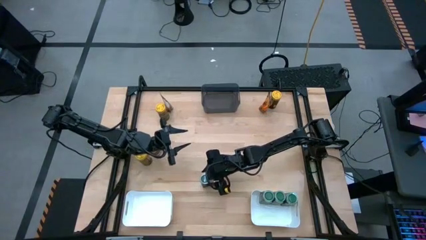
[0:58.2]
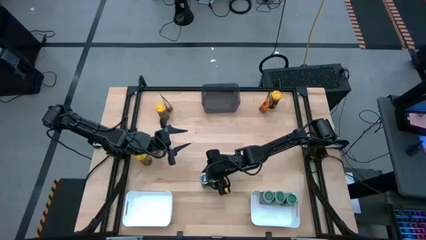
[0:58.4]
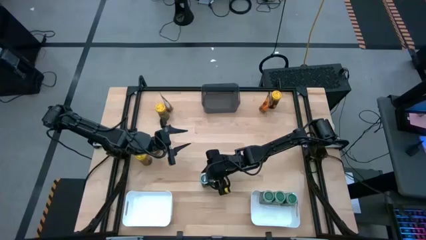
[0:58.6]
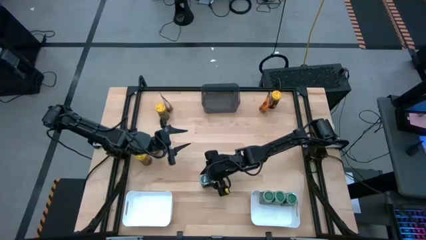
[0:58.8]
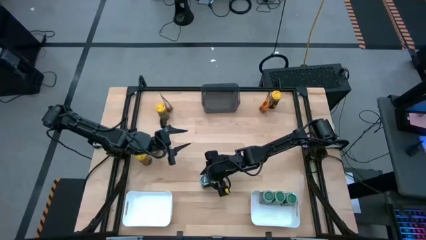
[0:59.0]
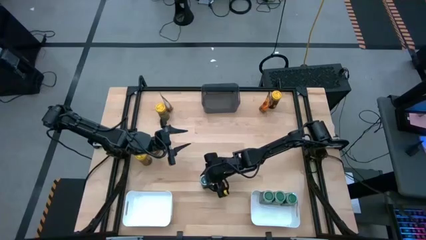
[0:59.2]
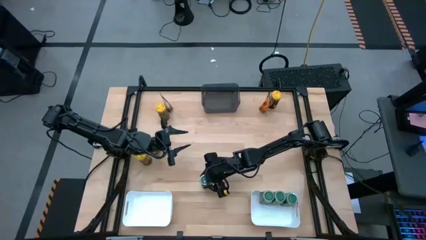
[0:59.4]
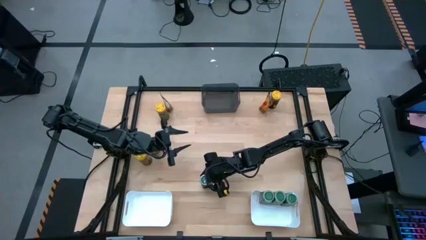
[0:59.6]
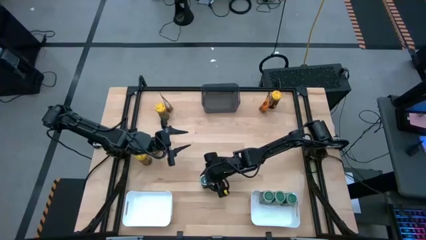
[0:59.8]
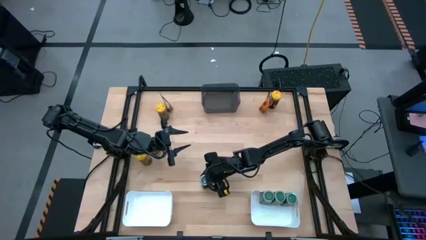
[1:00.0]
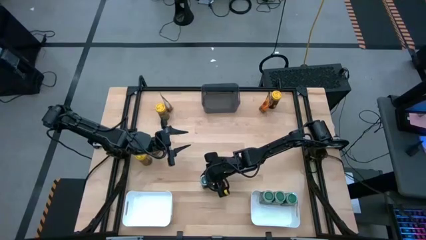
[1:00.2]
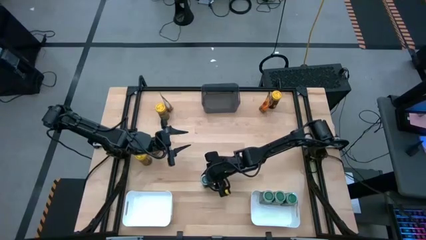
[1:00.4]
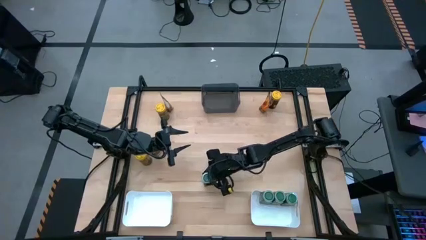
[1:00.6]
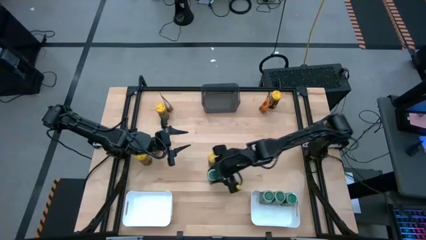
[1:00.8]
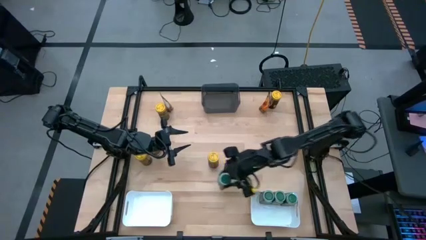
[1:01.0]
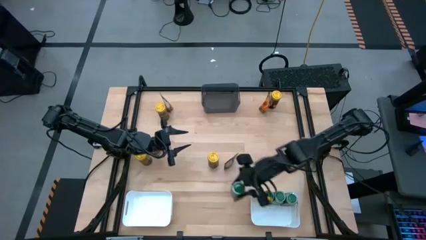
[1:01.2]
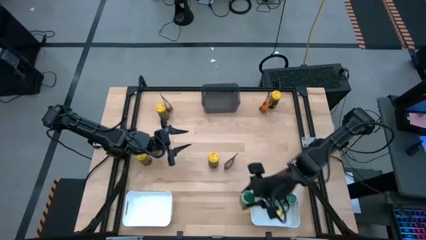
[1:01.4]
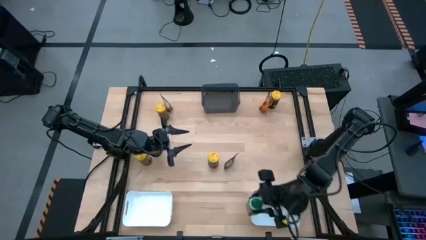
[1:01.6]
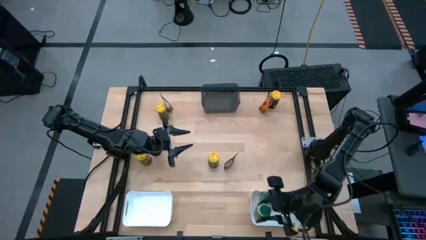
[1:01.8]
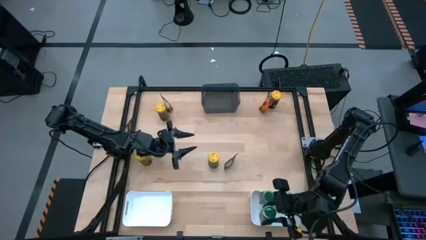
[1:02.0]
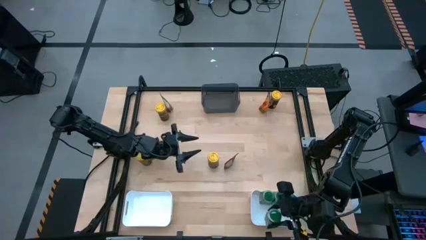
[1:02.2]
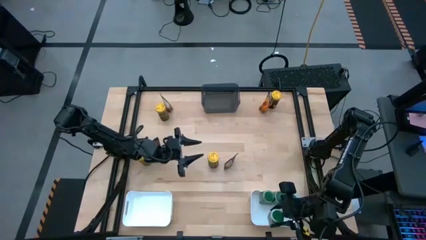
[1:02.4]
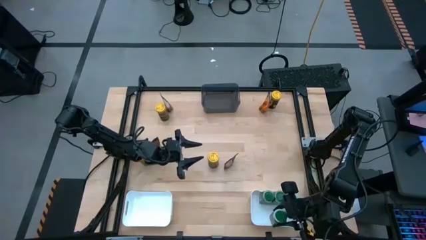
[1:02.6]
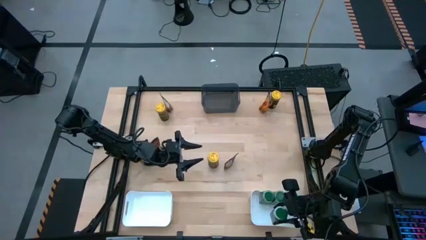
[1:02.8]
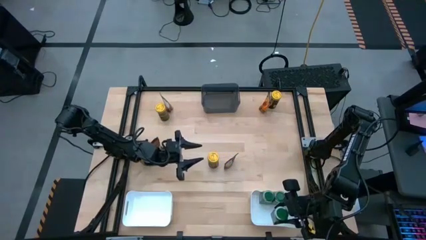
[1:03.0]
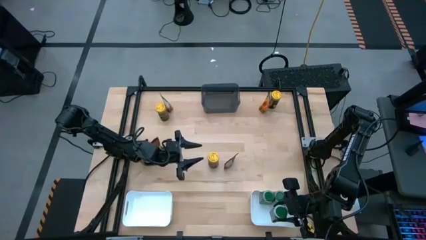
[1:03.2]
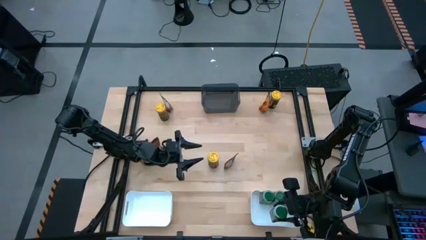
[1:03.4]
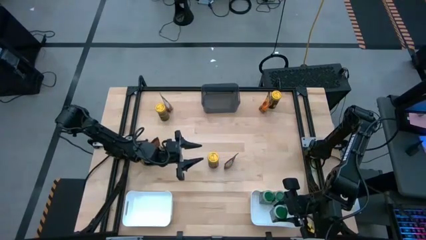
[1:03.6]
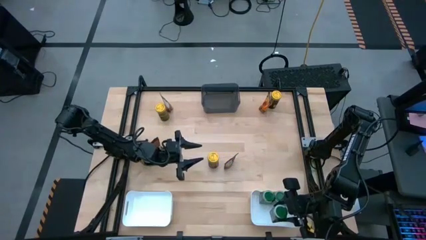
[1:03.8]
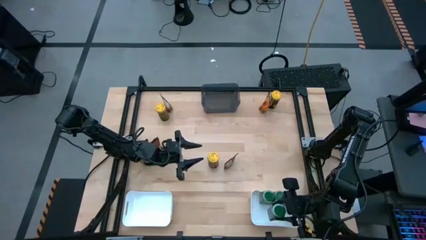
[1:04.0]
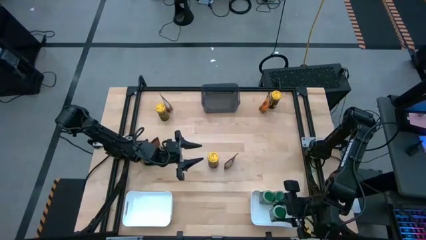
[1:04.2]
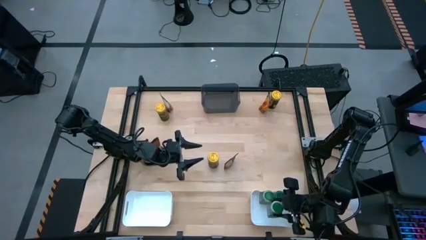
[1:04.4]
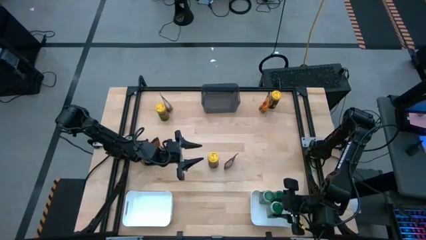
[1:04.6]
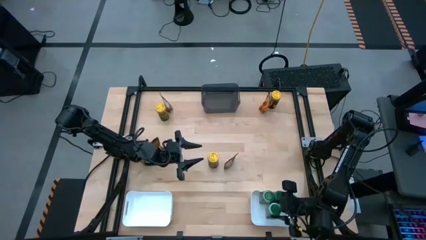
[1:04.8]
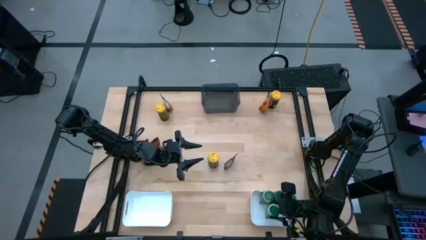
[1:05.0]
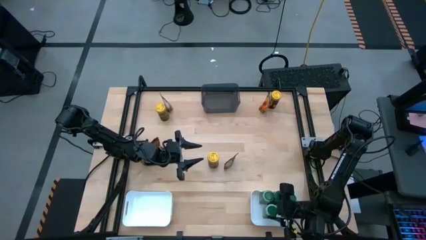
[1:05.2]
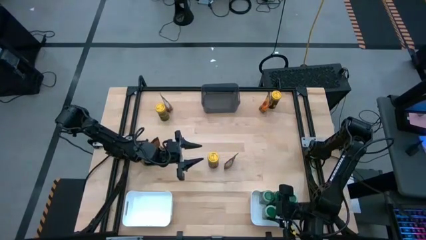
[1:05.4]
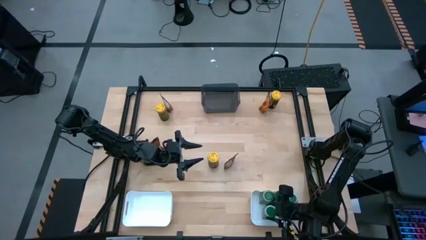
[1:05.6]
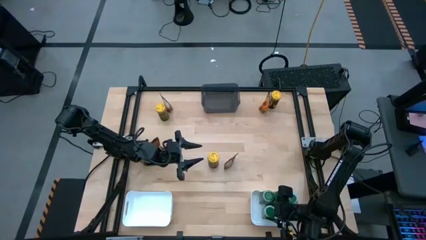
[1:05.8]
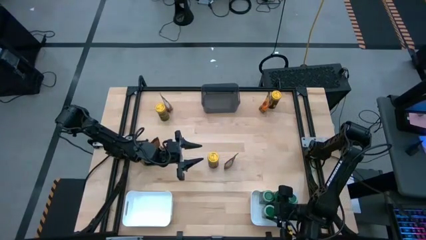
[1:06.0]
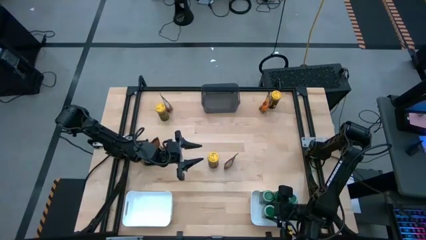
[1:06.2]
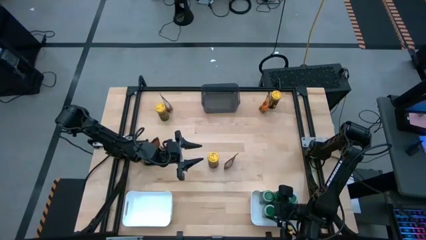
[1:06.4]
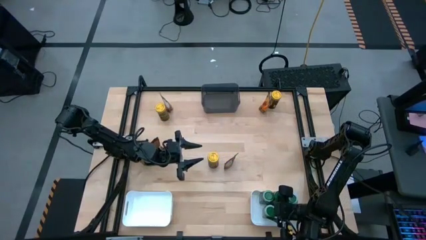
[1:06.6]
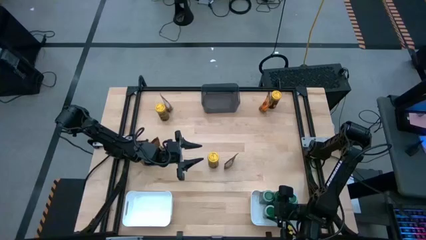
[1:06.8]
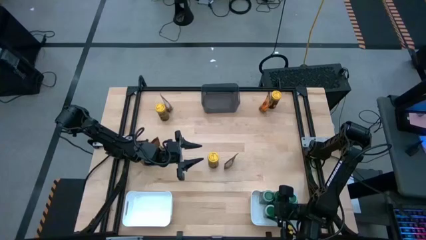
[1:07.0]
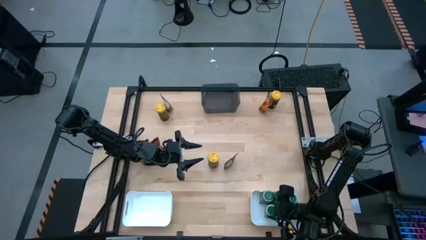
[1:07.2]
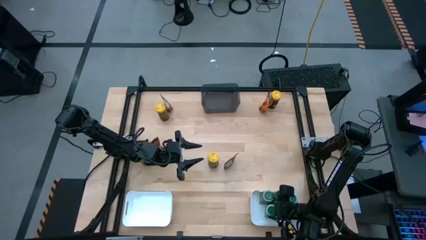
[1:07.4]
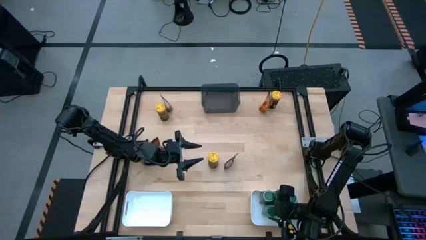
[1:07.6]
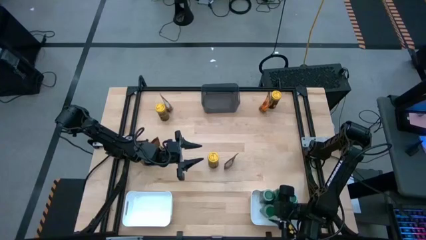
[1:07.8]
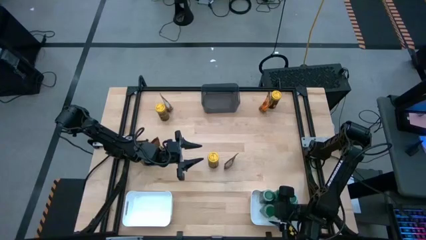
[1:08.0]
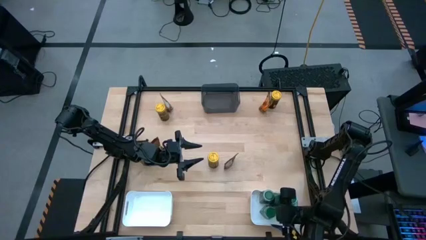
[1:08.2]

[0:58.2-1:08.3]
Task: Sort spices by type
Put the green seasoning bottle into the right white bin

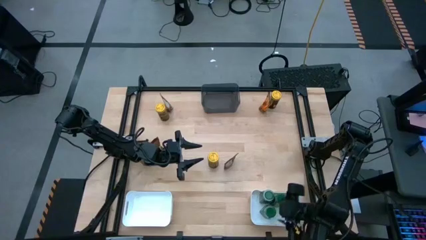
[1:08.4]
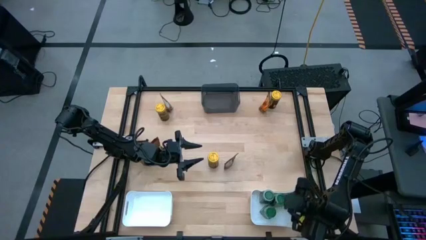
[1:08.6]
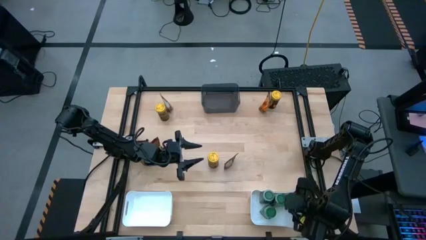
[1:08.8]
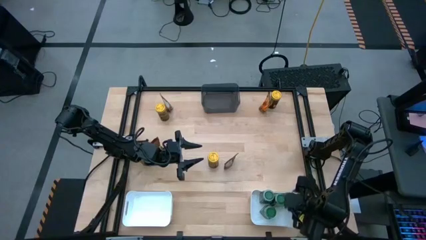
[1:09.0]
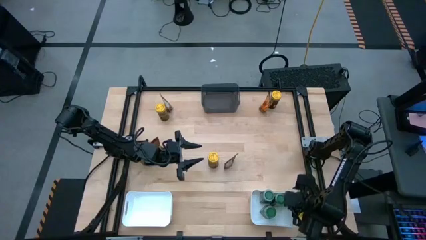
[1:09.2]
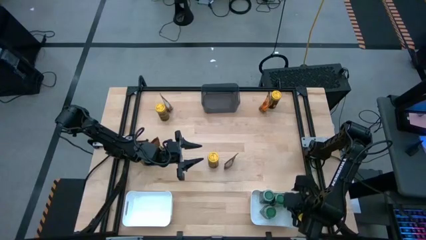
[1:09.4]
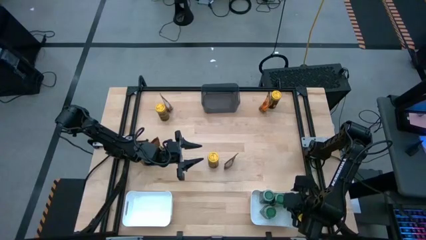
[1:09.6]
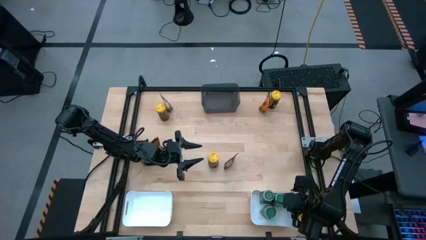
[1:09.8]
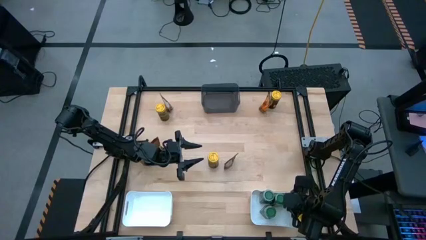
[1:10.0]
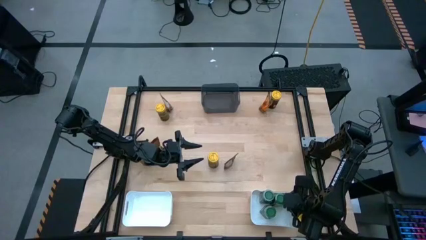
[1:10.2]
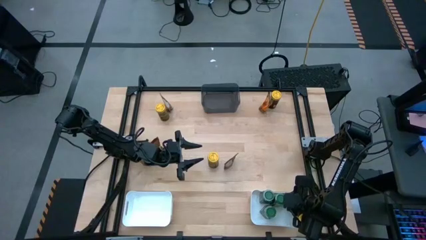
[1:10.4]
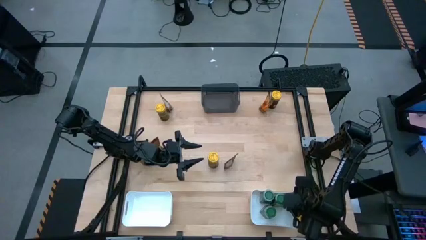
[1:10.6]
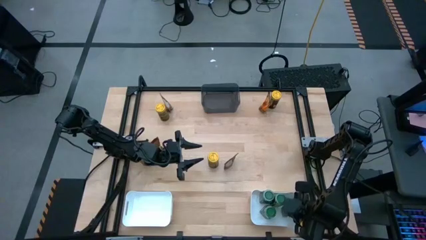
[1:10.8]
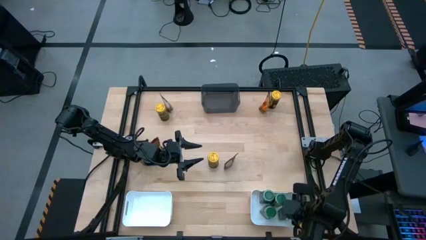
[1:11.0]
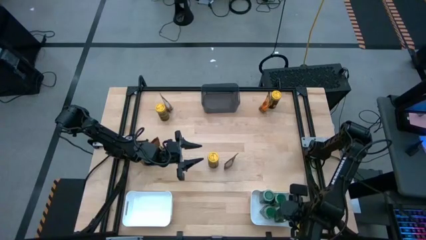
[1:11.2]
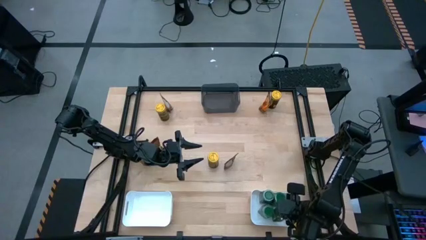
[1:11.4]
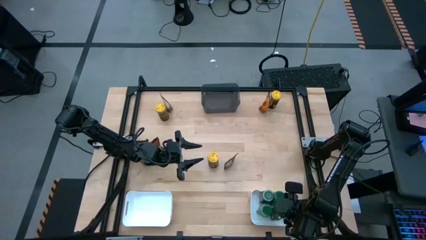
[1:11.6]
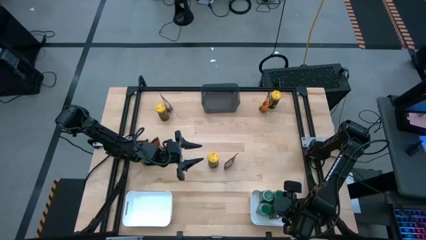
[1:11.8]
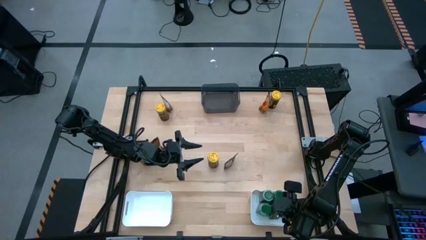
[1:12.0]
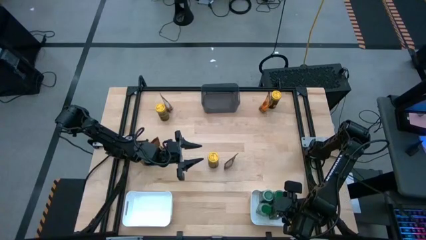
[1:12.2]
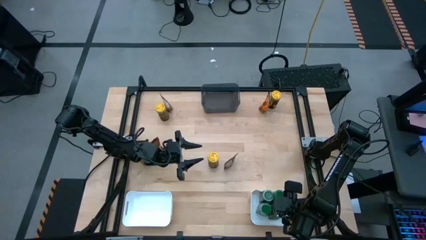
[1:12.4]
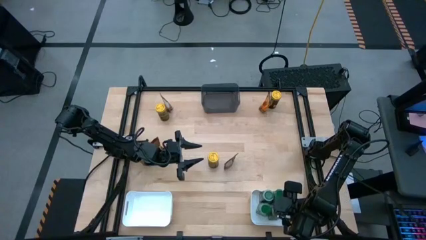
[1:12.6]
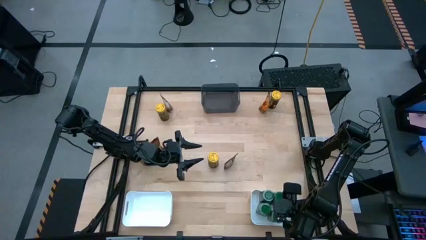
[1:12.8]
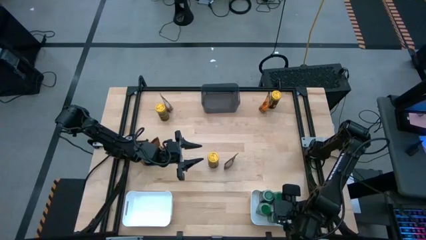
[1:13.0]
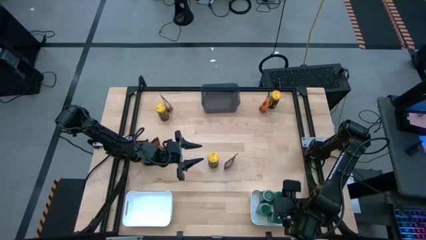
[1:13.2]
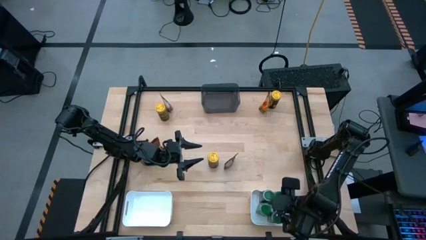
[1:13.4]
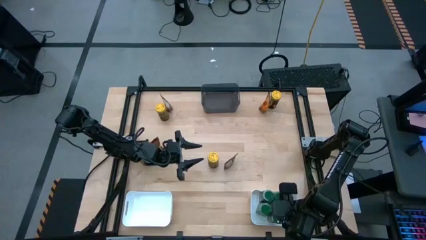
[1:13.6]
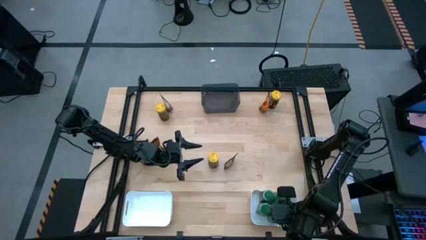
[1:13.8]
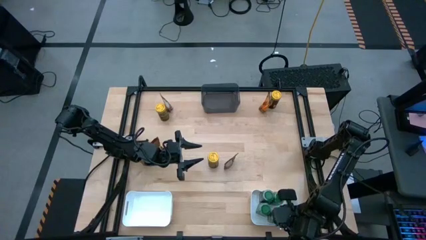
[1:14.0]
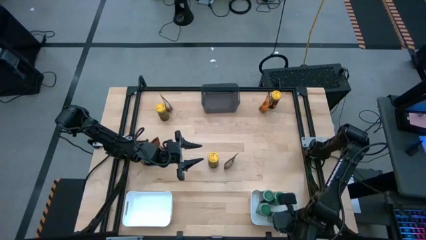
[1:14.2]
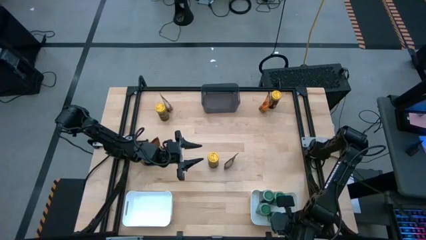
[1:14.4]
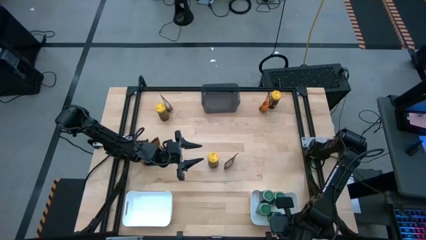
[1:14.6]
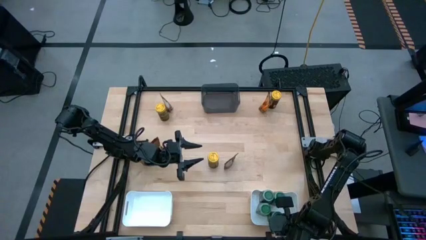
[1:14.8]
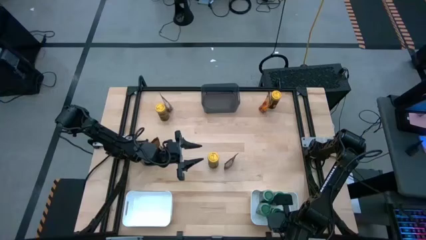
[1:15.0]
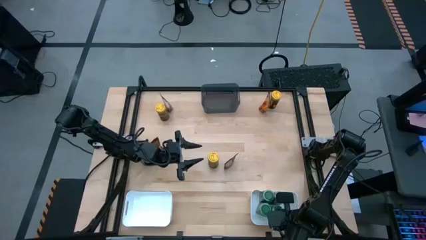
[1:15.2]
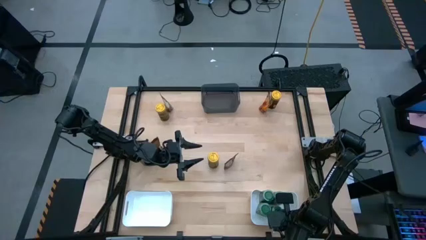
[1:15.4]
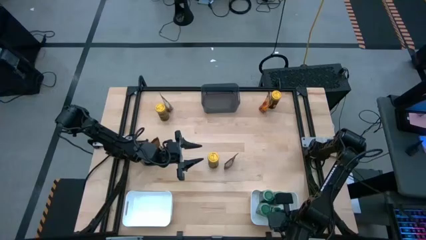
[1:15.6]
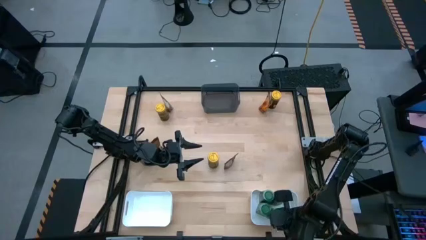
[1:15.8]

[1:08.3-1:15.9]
Adjust the green seasoning bottle
